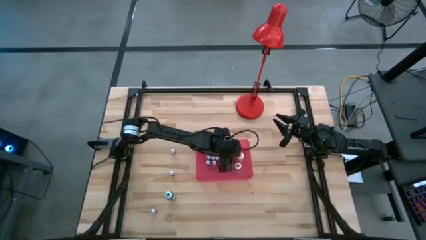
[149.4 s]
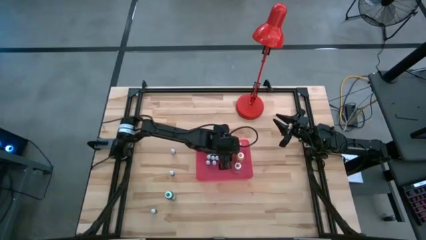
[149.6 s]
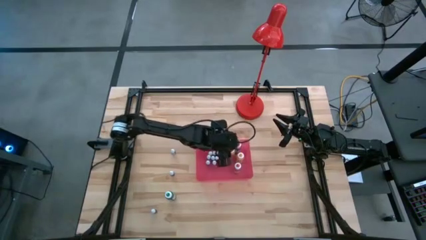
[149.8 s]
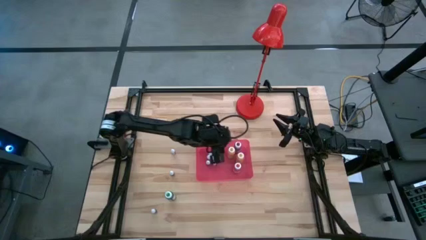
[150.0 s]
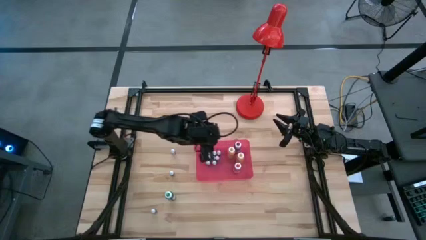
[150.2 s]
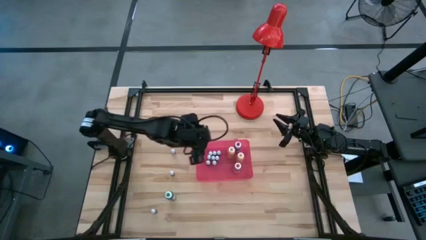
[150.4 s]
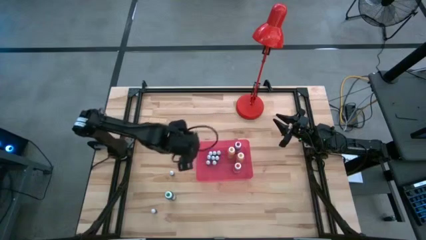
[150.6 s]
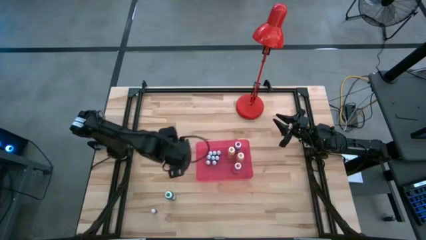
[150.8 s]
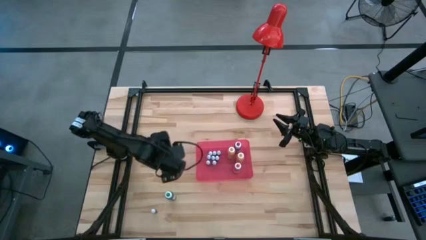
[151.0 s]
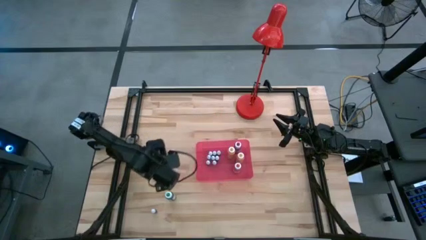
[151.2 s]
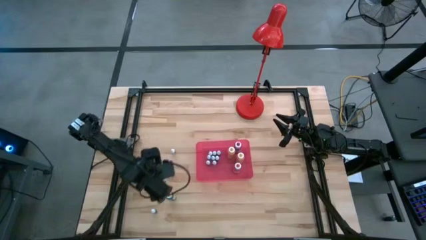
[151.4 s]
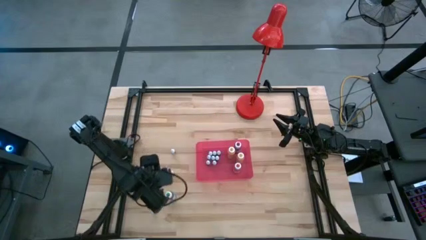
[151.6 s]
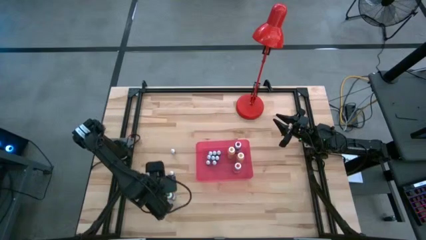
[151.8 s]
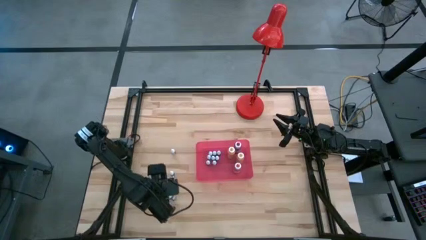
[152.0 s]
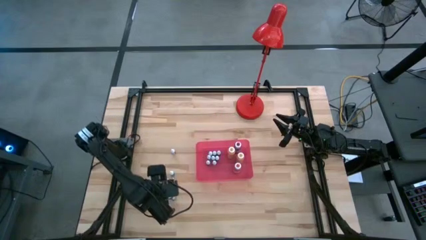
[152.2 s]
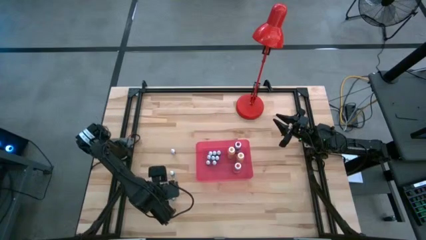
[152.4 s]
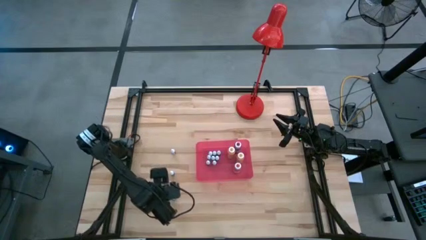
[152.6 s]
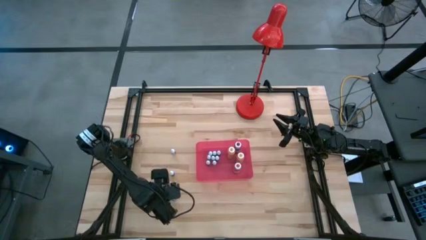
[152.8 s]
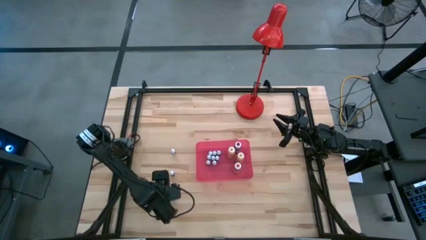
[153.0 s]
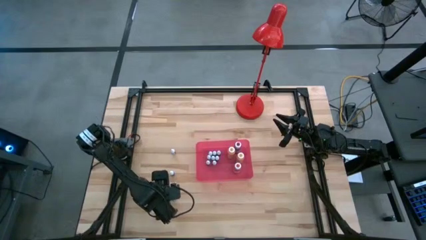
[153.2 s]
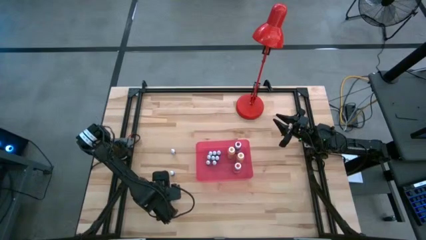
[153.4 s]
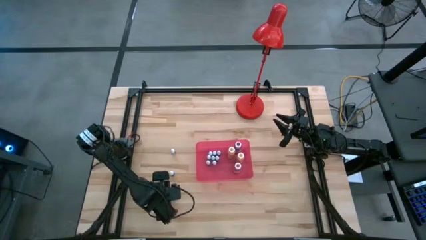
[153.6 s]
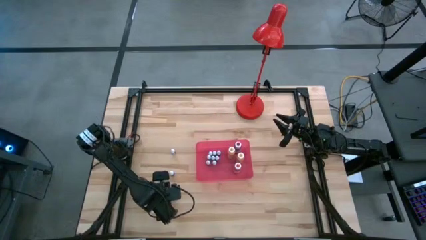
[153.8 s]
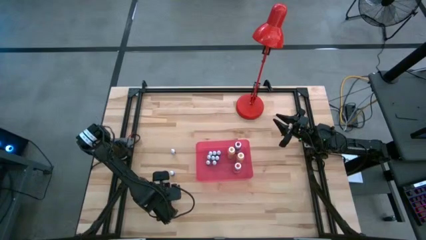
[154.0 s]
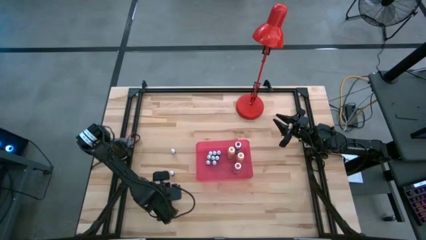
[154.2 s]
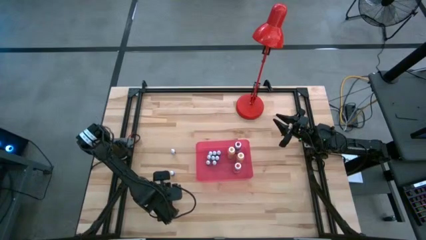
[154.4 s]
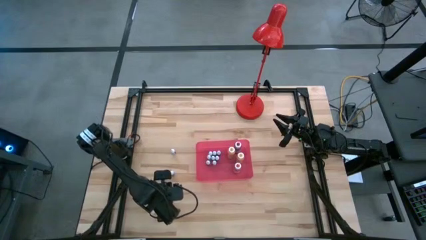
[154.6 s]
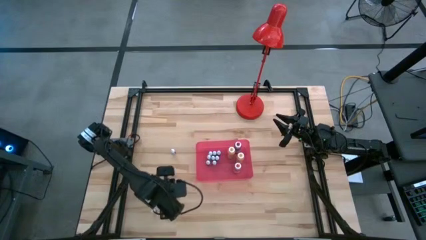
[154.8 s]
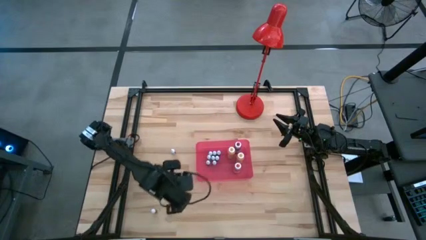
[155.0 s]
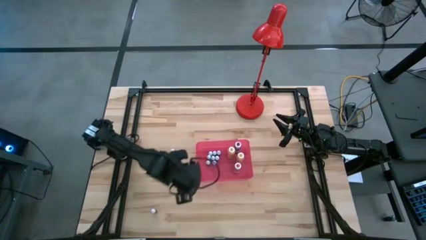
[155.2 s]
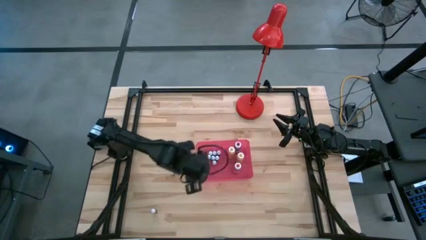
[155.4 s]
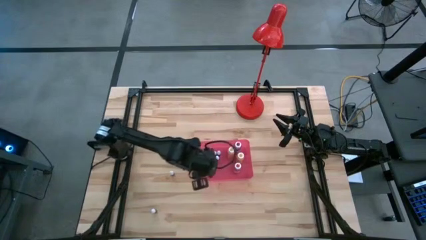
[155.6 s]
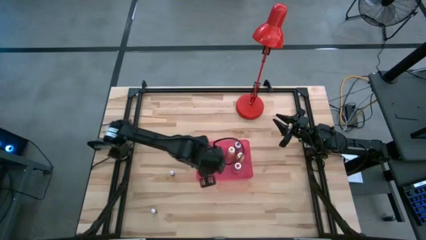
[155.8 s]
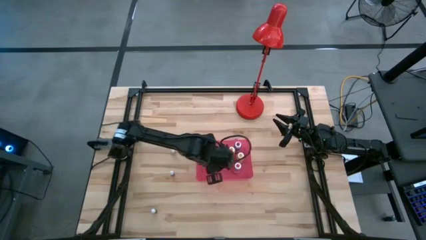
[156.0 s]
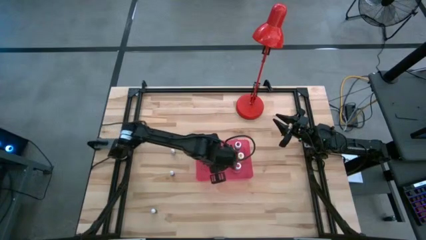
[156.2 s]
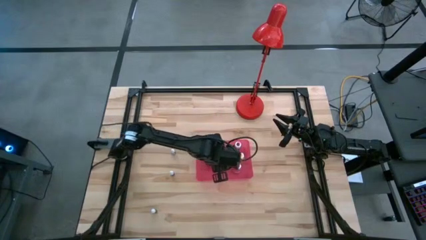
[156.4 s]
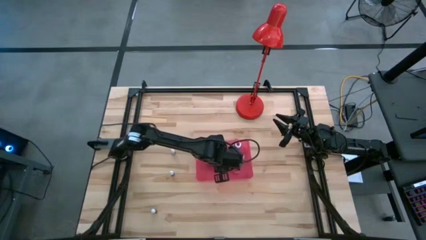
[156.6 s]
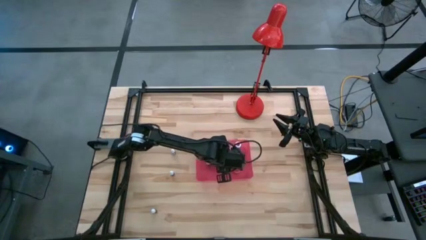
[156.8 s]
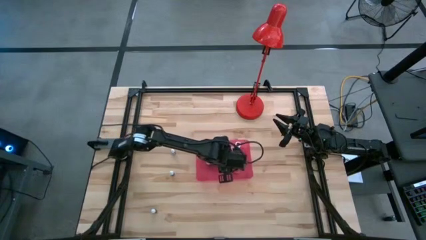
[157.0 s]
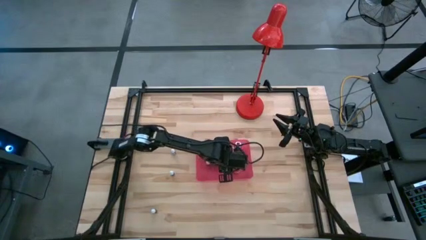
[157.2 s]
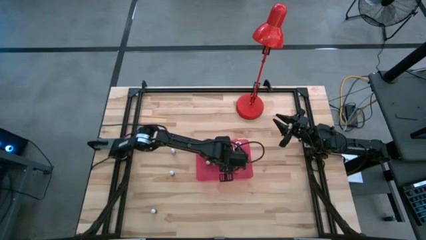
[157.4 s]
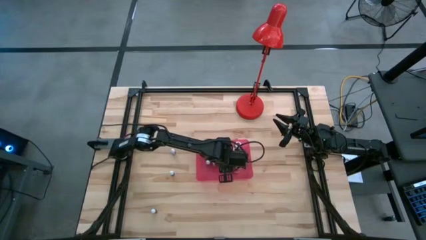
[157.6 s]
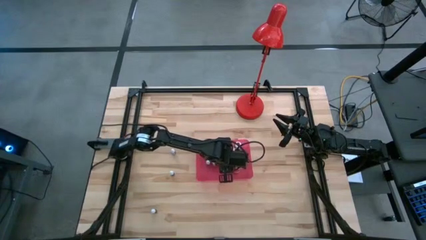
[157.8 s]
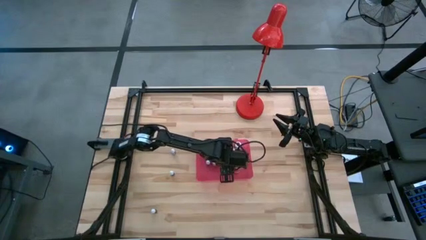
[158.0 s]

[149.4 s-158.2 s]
Task: Pick & Place food coloring
Put the large green food coloring bottle into the red bin

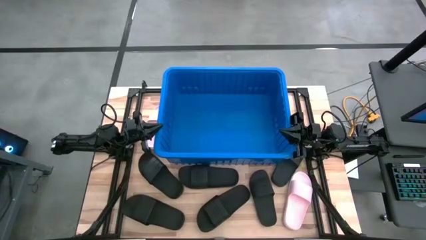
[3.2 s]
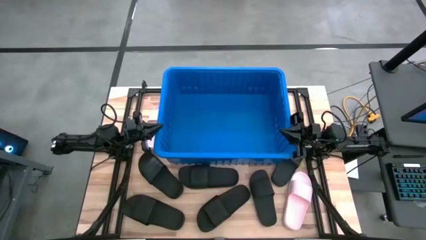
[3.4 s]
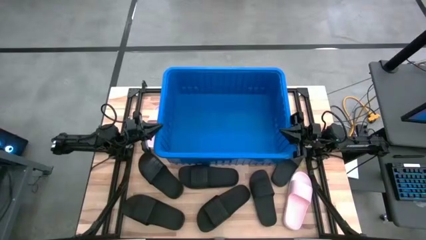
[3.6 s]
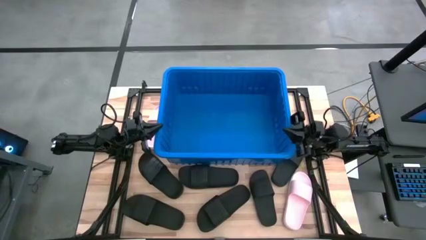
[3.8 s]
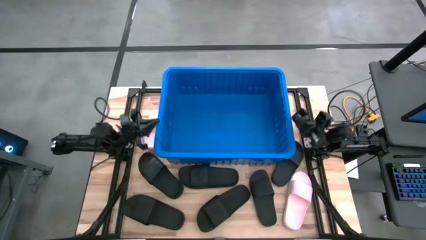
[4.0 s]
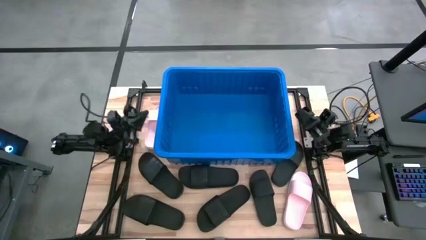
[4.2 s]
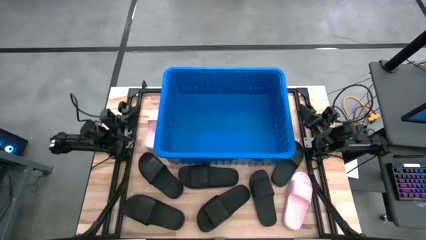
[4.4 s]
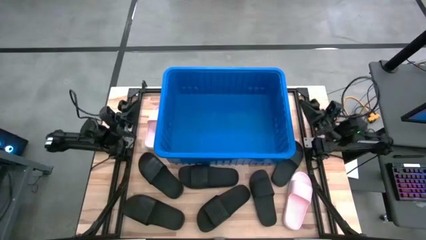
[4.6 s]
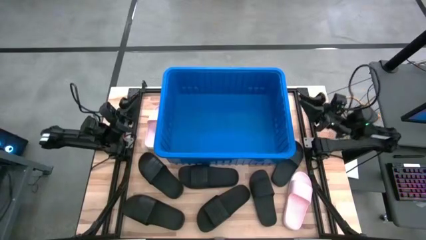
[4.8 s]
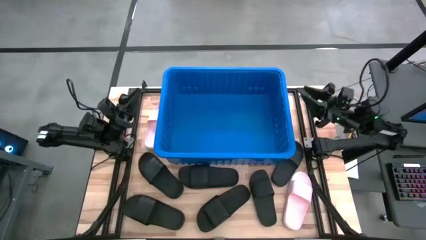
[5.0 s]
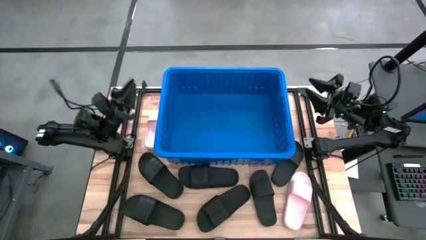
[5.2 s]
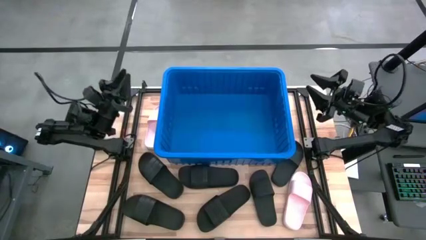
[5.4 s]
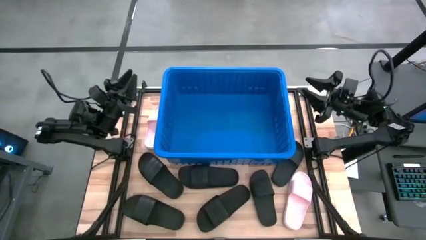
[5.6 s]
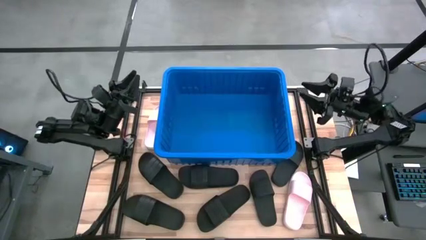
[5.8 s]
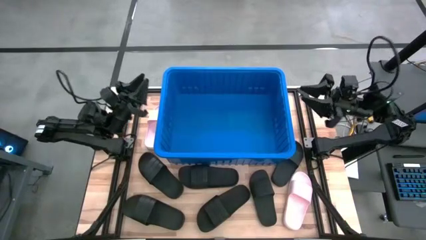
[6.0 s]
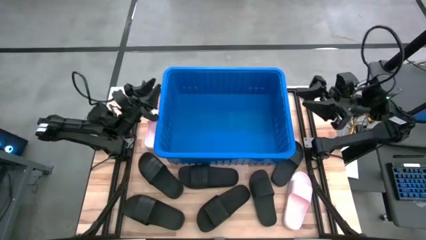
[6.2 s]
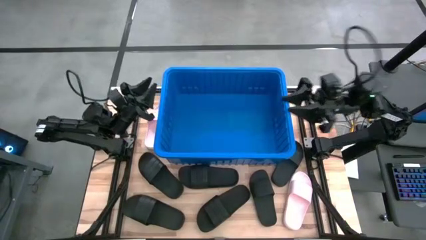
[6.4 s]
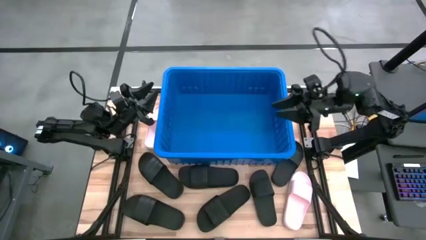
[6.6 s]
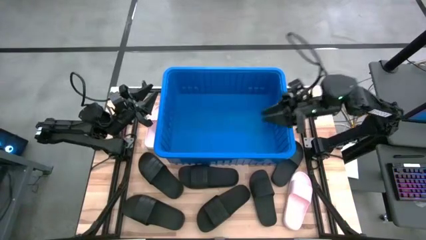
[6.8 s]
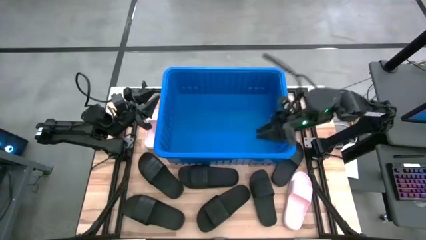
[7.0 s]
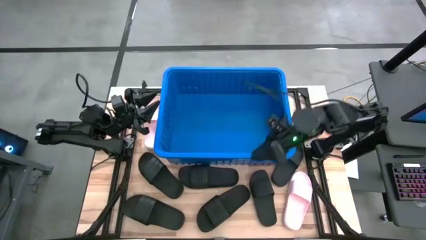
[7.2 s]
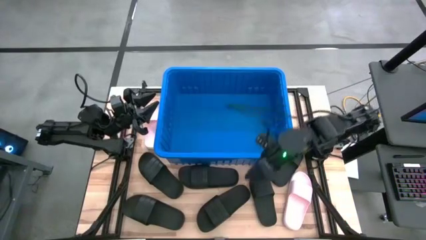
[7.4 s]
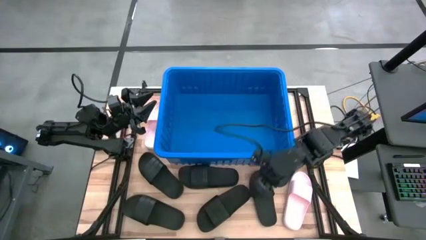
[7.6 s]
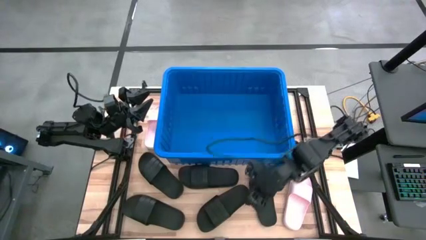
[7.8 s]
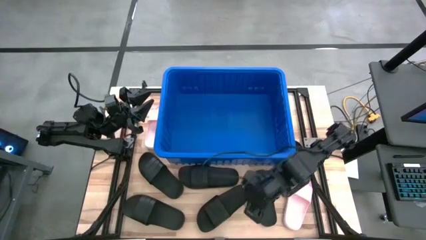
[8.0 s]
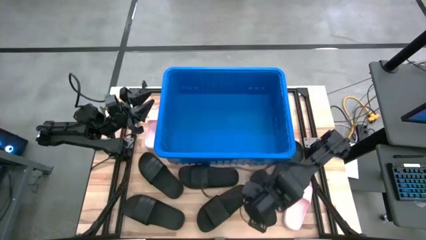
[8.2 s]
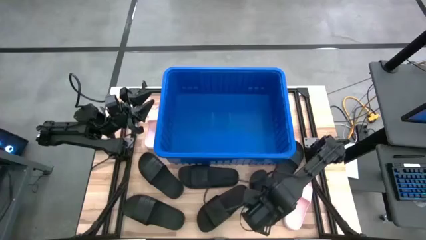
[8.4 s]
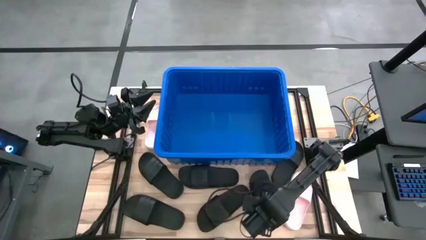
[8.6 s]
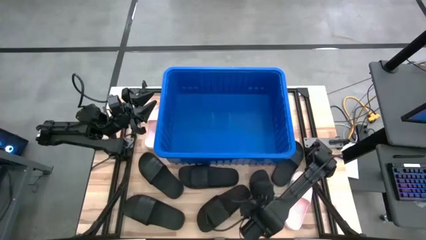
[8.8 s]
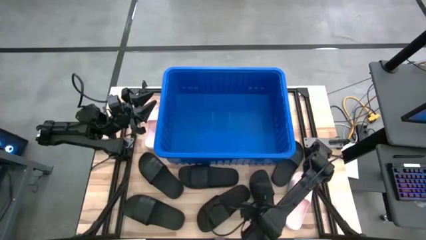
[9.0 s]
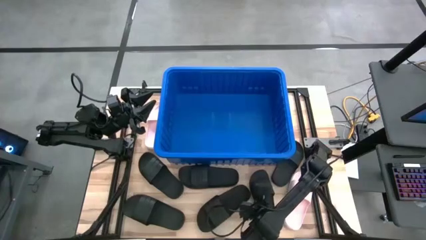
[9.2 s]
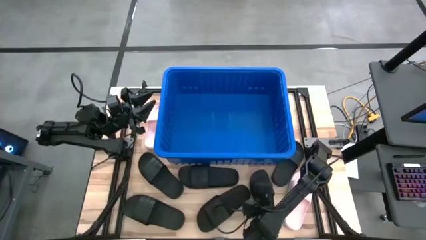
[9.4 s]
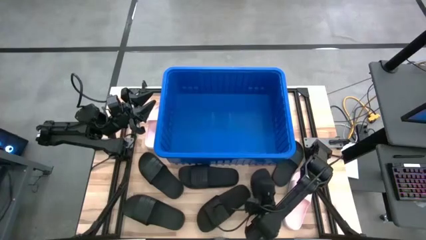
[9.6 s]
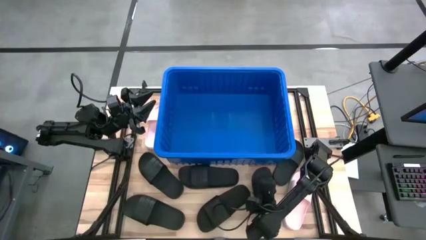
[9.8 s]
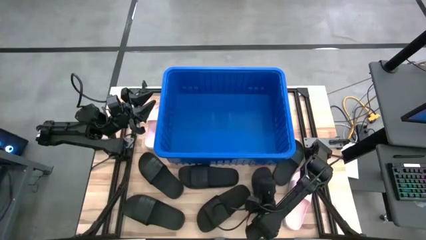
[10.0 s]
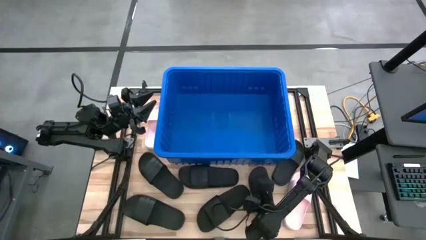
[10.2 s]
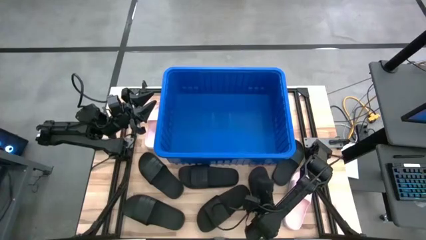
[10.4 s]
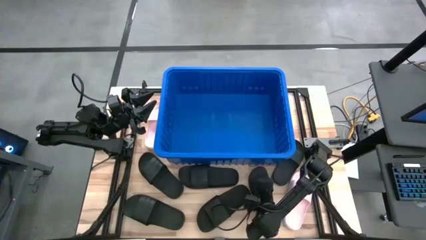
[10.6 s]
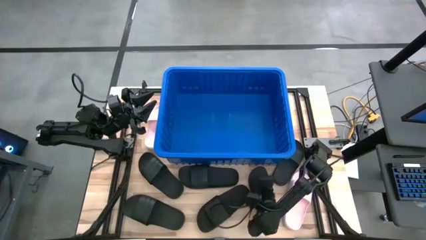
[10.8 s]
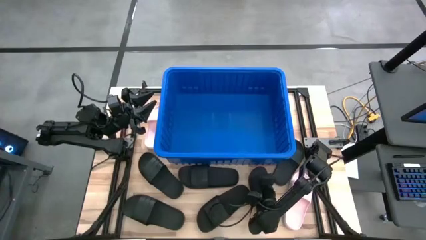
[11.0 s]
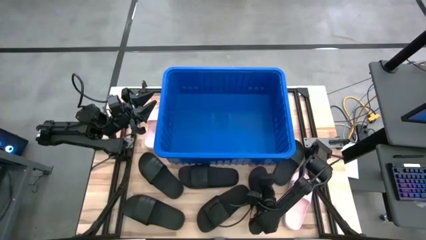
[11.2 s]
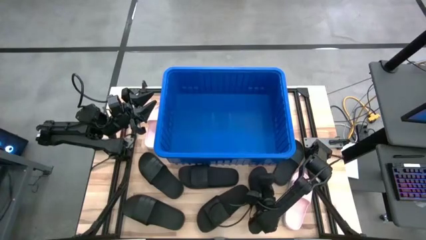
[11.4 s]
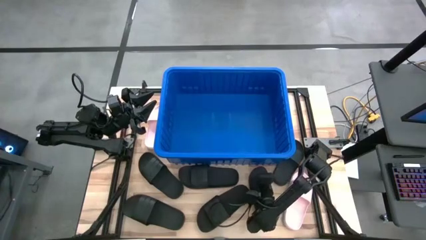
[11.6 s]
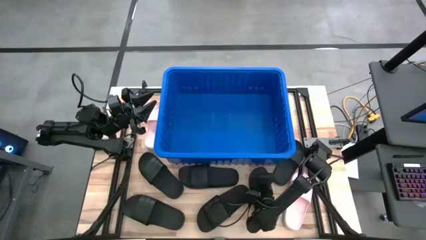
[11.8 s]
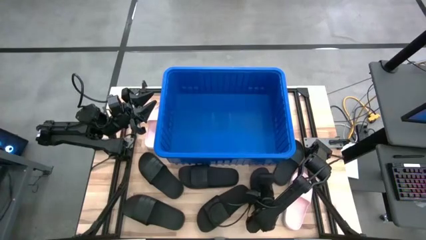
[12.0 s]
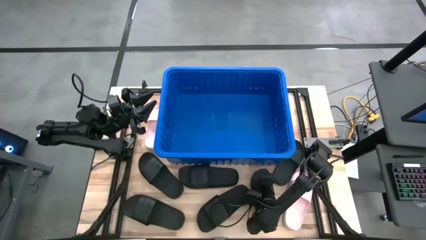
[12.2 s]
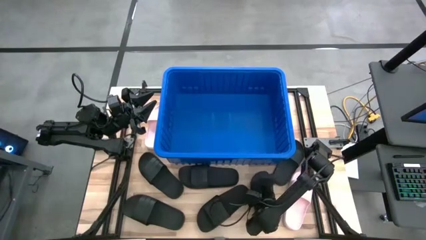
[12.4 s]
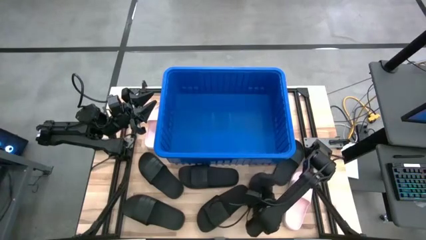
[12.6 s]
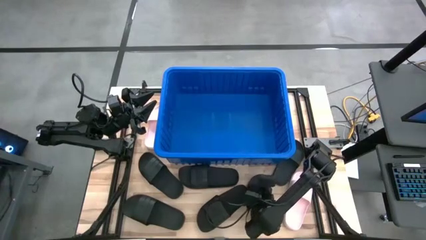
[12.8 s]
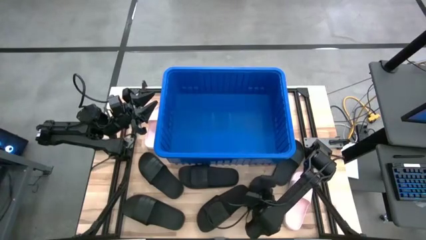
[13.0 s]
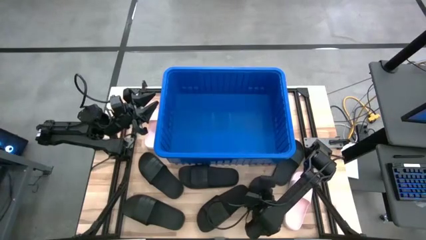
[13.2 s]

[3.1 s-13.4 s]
Task: Pick and place slides into bin
Put the black slide into the blue bin
